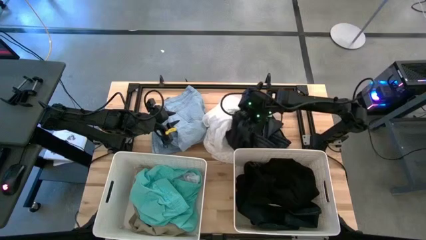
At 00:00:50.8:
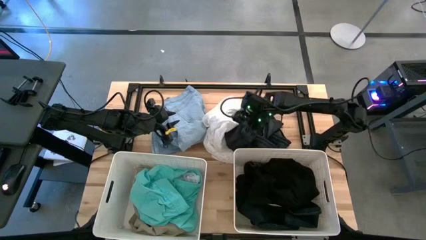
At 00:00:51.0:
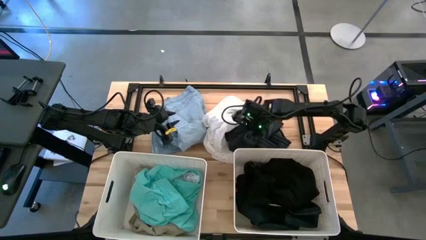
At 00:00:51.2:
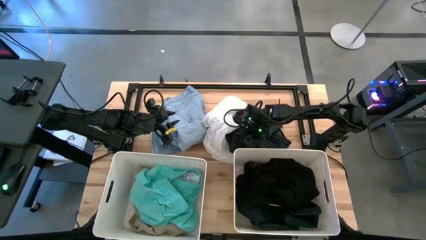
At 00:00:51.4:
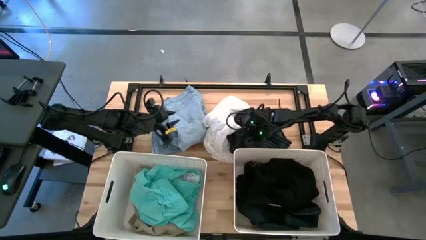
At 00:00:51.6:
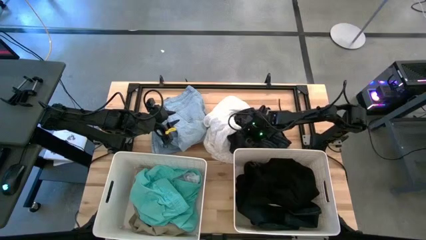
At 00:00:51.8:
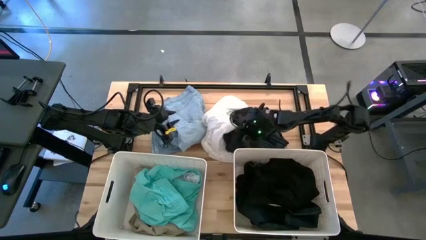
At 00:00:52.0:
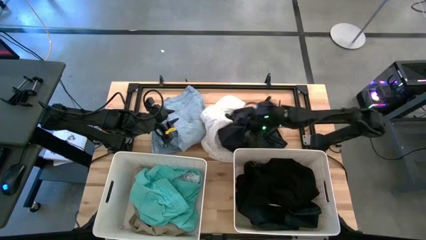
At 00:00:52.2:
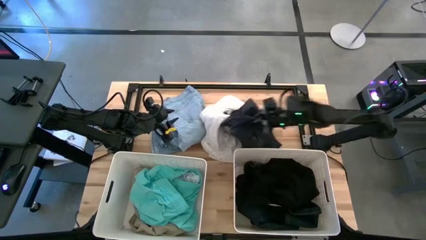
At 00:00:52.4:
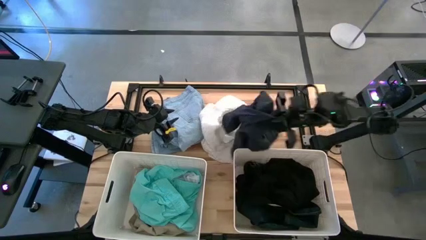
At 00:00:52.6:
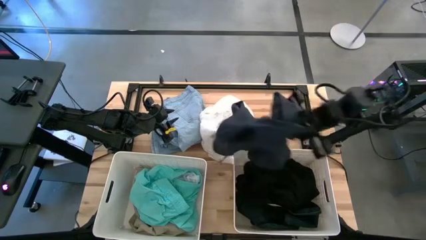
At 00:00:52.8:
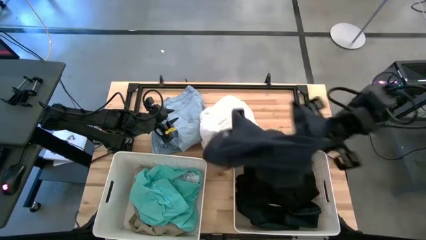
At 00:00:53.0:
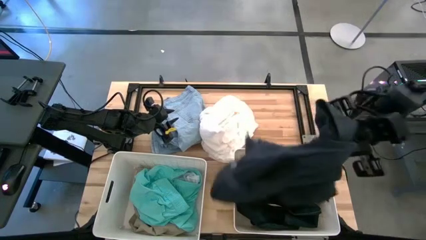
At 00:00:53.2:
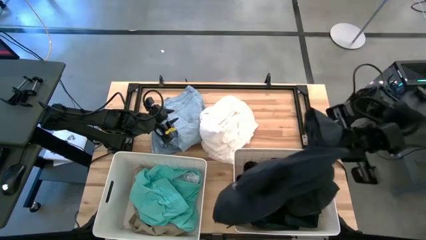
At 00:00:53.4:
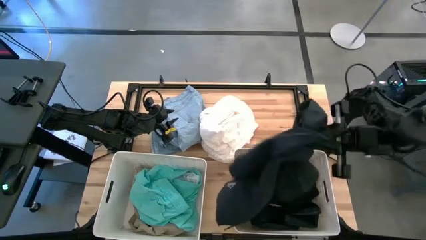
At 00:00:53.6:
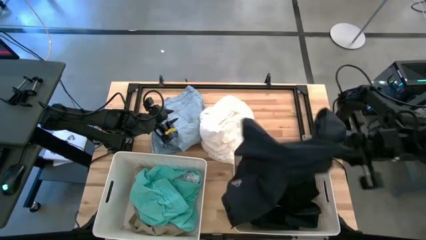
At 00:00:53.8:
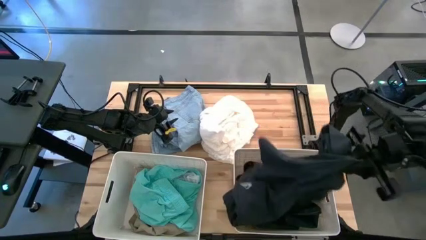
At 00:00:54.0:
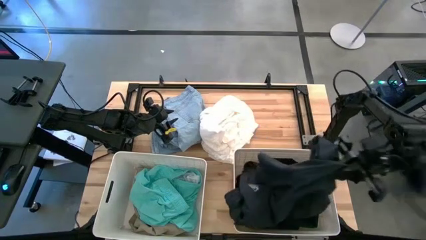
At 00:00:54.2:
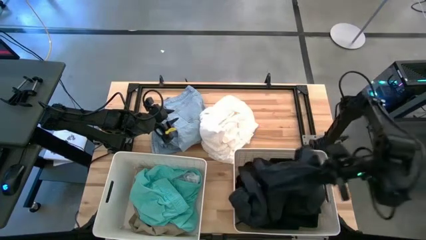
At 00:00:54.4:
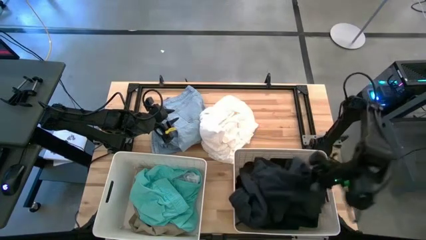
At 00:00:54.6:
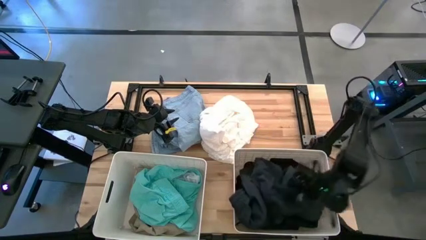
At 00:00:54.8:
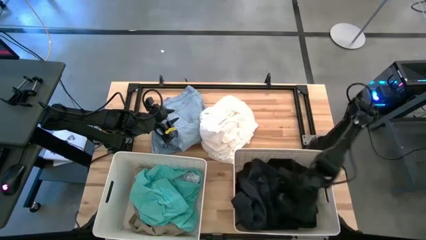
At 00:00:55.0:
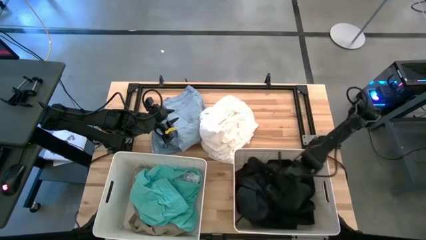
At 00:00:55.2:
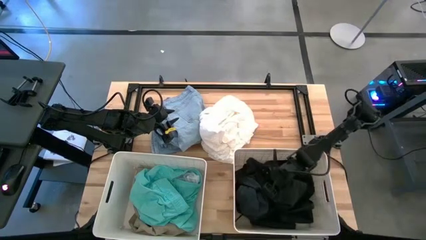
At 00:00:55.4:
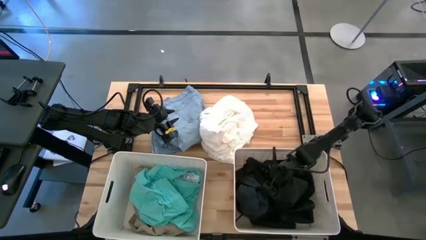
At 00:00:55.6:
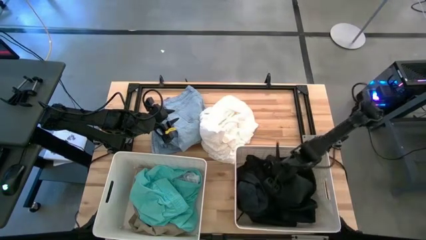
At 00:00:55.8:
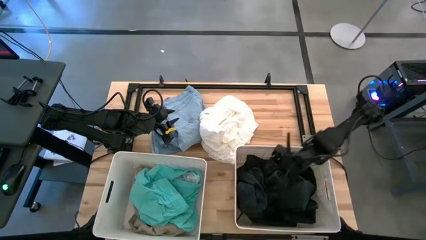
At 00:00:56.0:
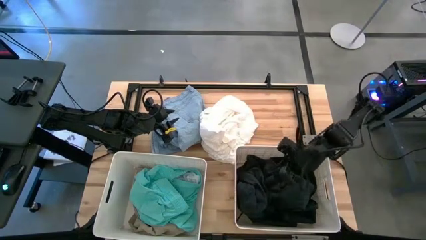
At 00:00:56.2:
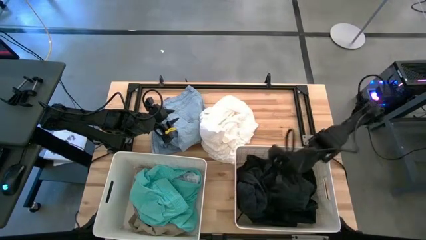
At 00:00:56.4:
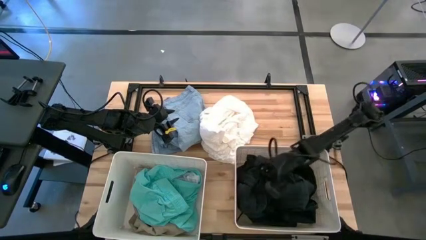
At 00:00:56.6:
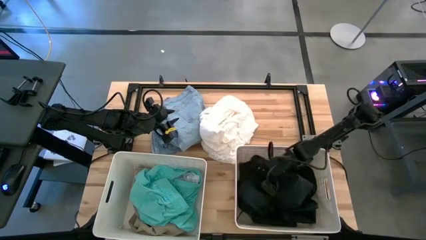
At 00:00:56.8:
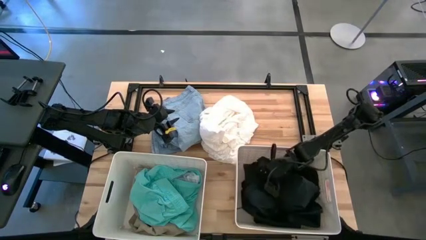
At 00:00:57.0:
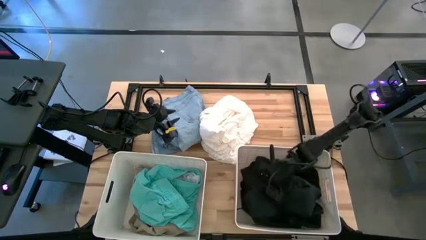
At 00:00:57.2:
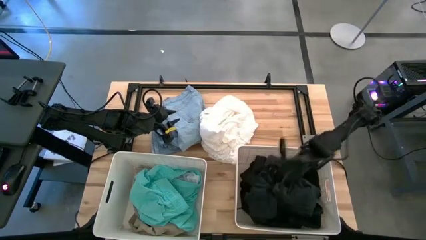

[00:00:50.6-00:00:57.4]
Task: Sort clothes
Put the black shorts into the right white laundry bin

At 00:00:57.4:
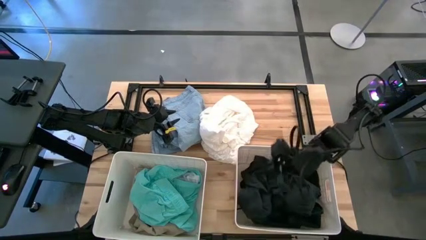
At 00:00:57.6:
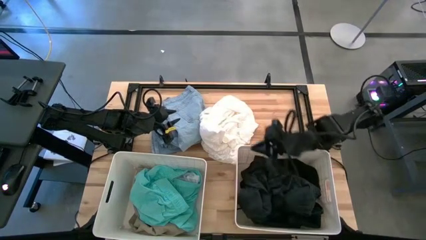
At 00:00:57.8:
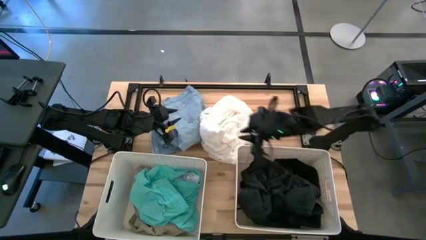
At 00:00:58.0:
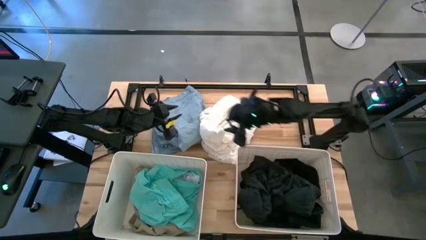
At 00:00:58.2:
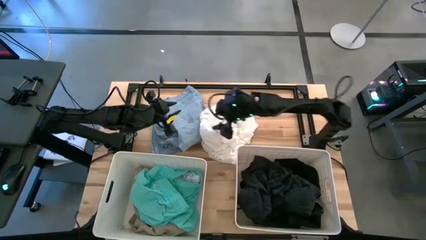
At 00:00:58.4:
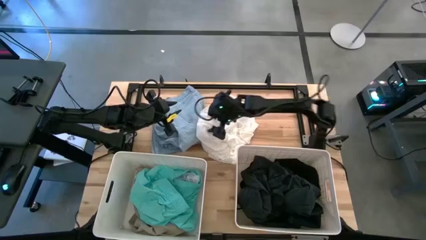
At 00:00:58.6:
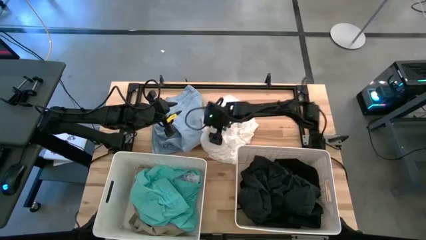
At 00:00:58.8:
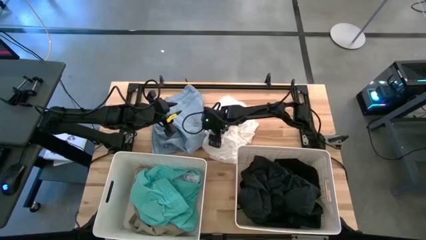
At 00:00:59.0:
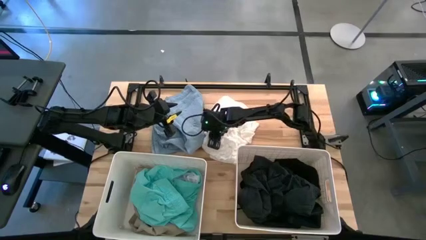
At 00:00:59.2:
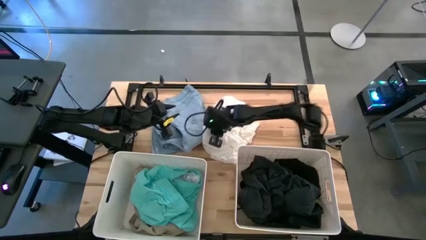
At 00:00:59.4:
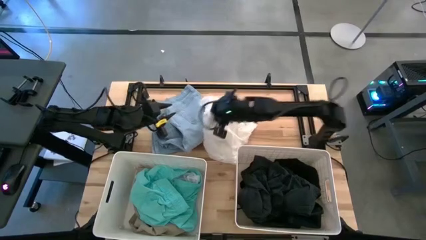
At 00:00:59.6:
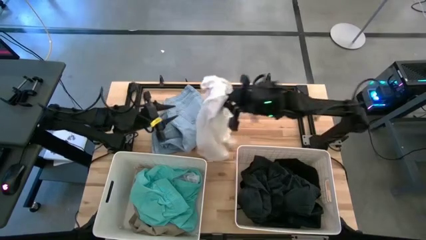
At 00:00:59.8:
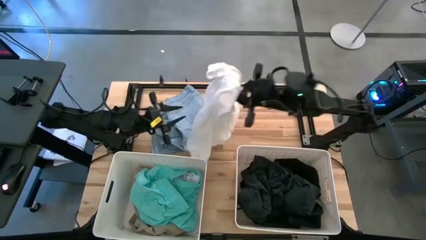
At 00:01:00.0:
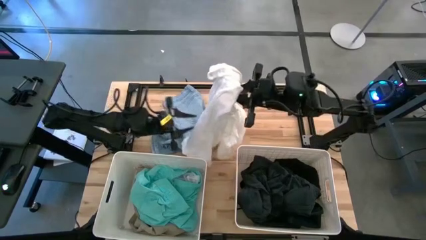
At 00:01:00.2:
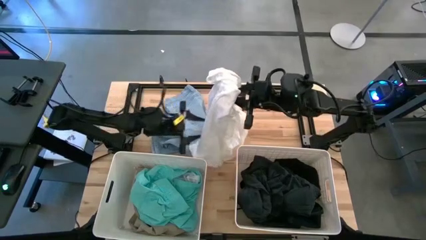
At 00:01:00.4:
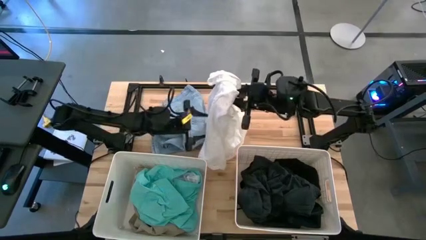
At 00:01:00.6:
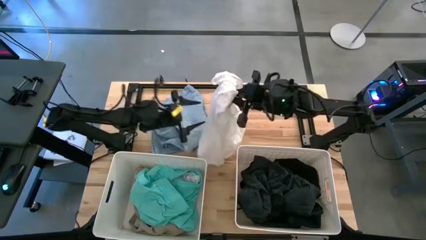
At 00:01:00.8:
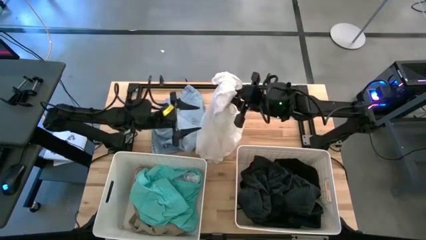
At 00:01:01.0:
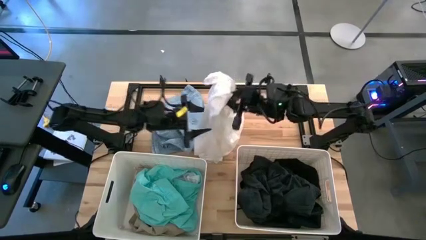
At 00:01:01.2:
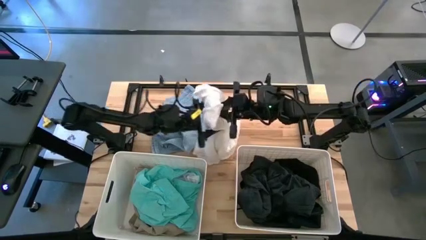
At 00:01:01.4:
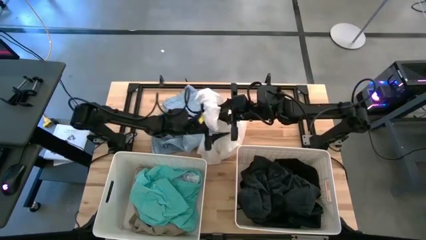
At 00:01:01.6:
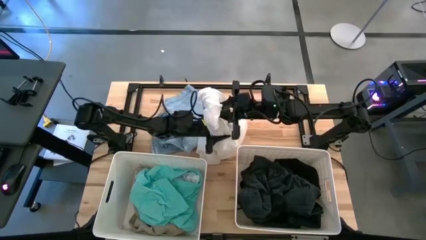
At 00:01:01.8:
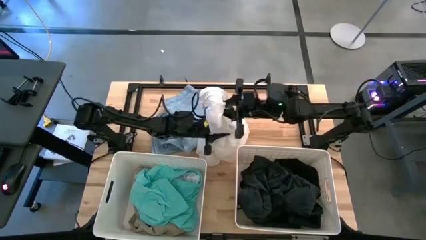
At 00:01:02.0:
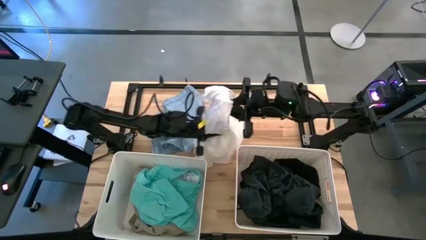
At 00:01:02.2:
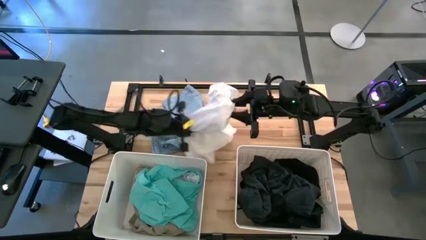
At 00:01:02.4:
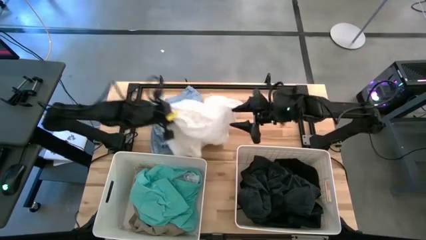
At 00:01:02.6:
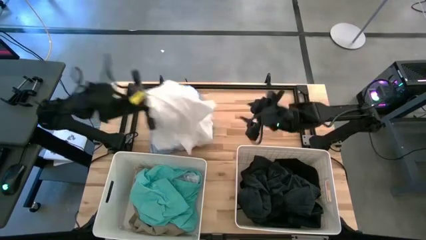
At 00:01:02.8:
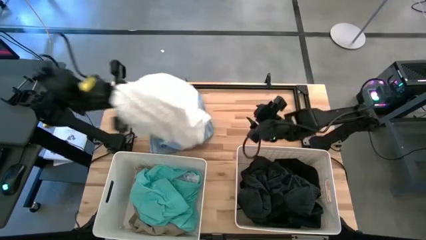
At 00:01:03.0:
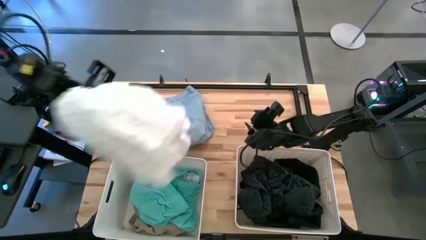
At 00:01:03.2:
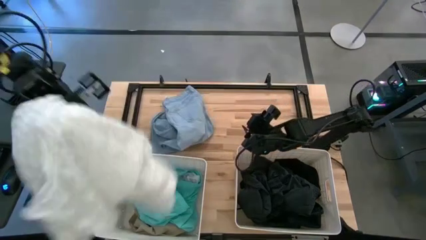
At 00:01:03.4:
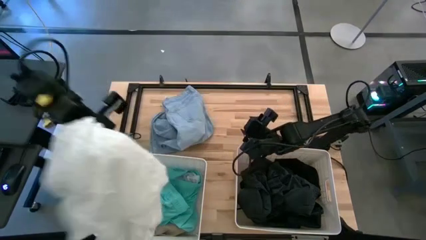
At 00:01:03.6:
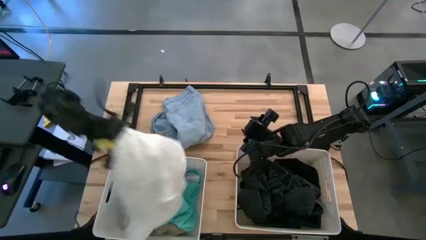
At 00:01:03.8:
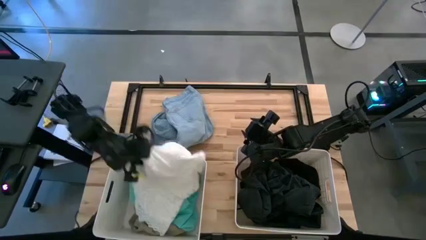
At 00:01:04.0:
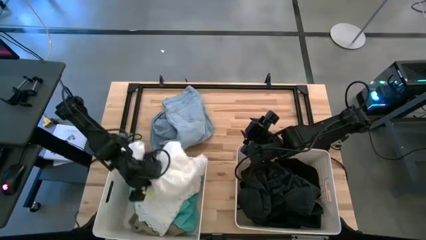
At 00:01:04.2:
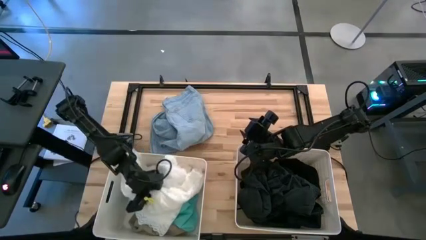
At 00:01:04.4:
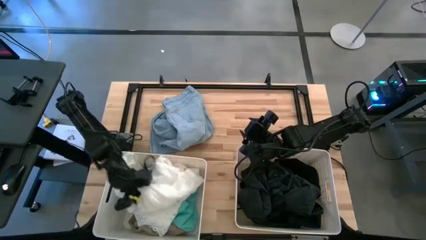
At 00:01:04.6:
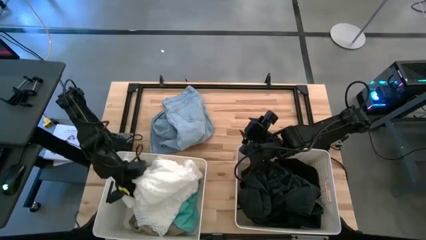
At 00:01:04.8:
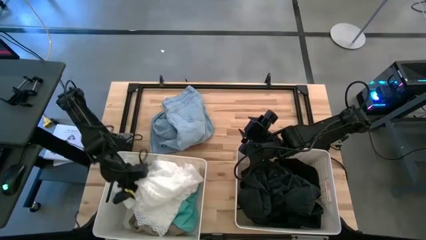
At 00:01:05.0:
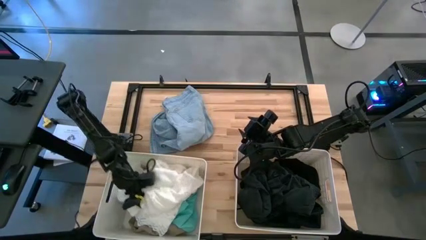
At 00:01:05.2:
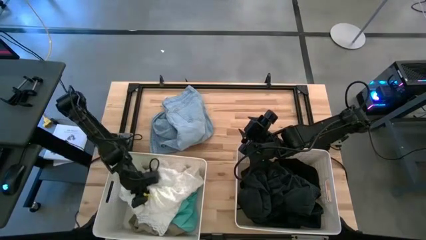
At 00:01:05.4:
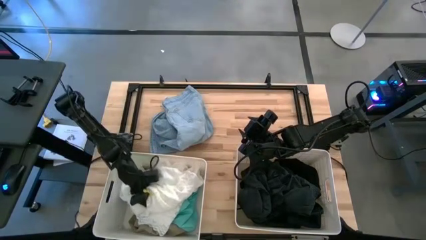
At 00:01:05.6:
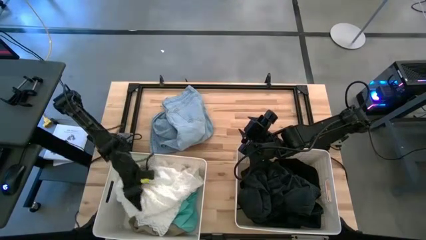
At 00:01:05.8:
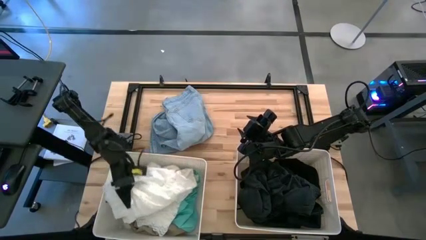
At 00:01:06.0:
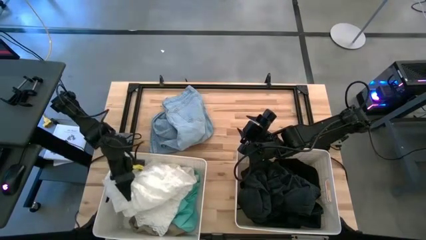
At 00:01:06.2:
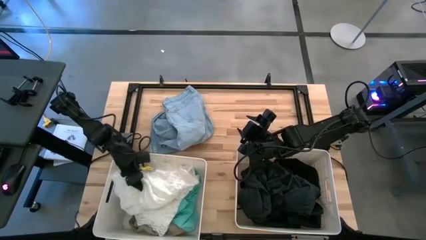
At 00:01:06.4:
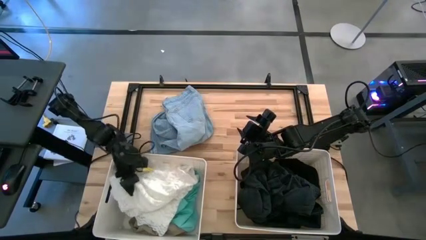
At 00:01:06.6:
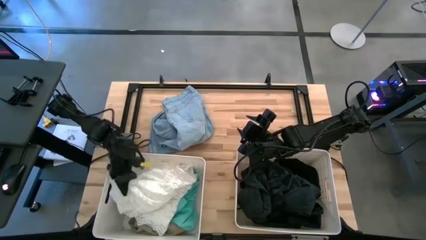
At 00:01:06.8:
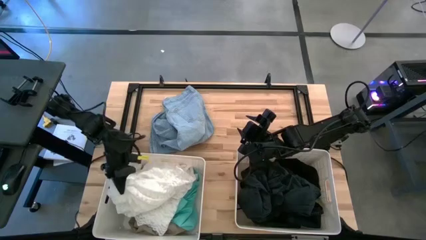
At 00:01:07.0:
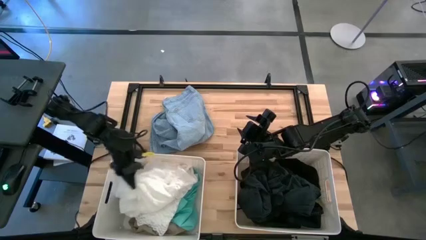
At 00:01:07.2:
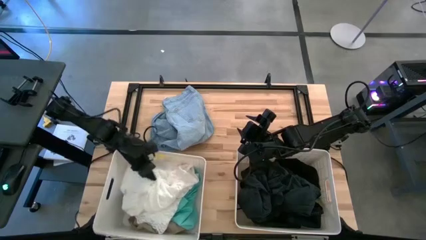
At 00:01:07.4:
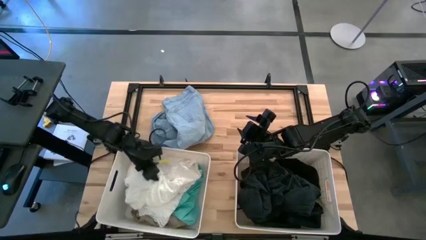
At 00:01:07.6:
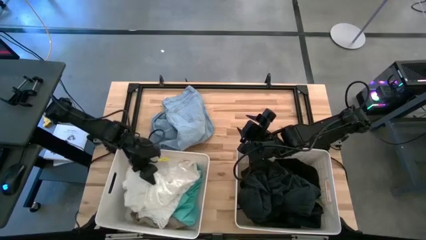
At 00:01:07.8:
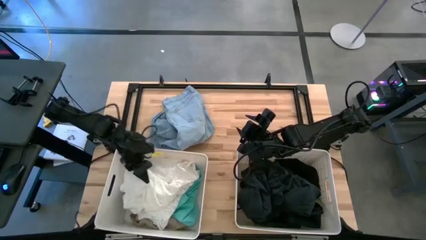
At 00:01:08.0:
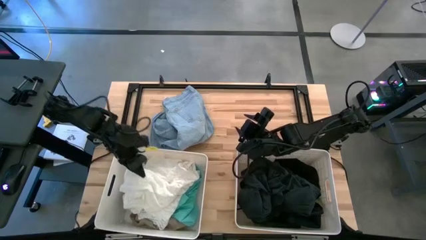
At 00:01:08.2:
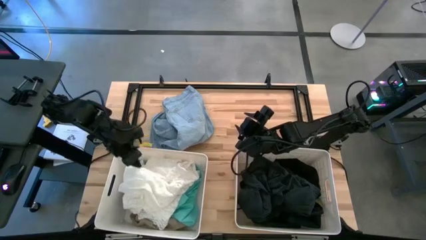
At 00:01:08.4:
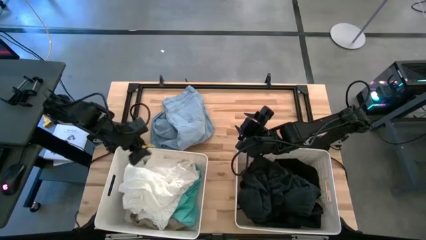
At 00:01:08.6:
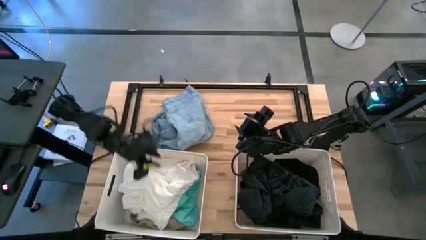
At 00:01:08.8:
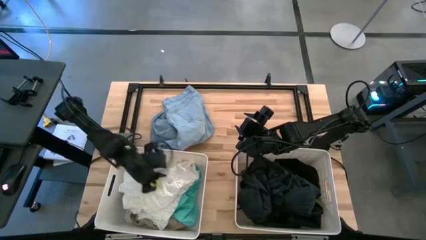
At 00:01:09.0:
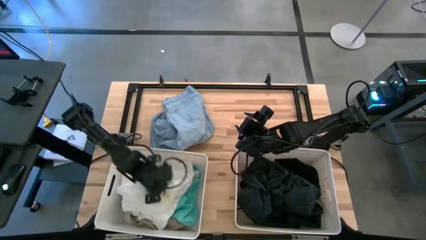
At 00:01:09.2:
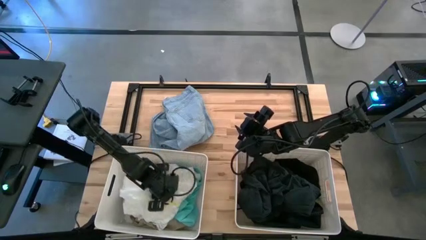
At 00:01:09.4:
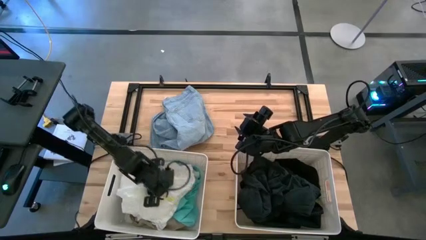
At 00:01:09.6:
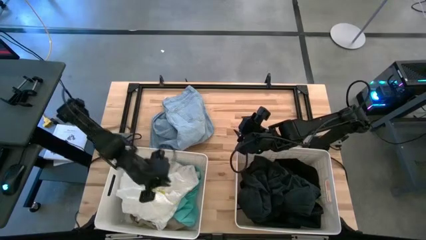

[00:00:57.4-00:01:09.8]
Put the white dress into the left white laundry bin
